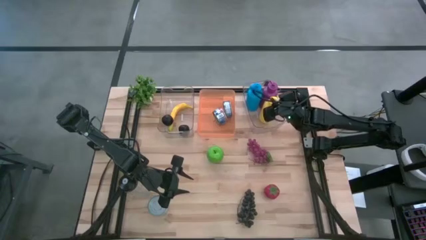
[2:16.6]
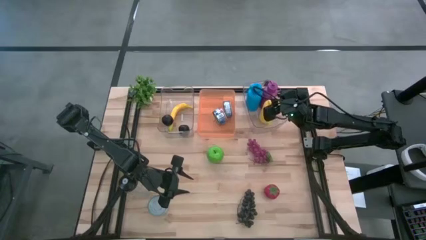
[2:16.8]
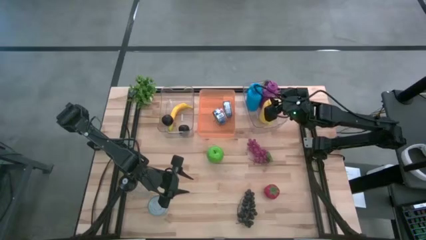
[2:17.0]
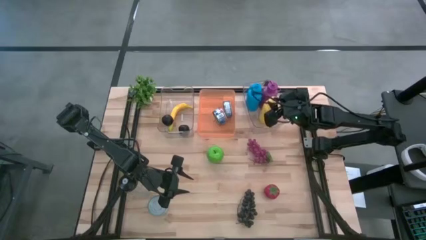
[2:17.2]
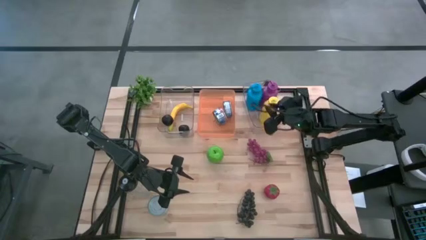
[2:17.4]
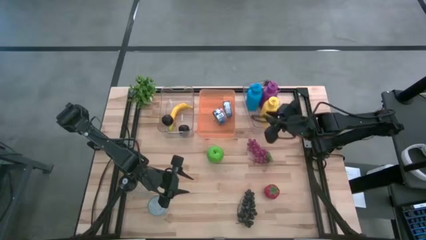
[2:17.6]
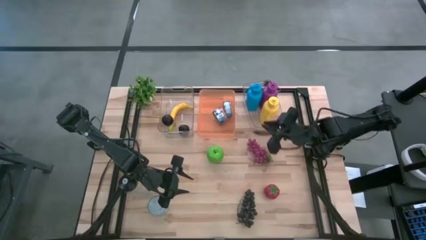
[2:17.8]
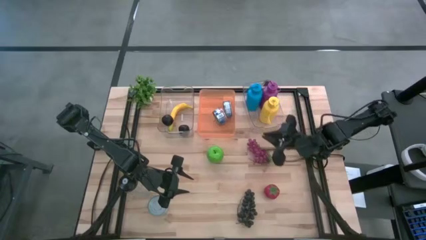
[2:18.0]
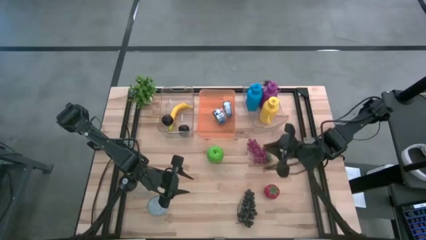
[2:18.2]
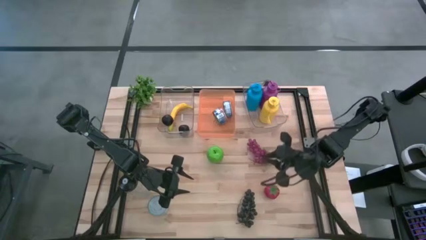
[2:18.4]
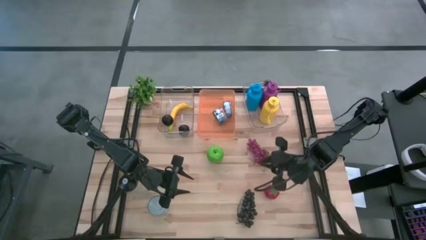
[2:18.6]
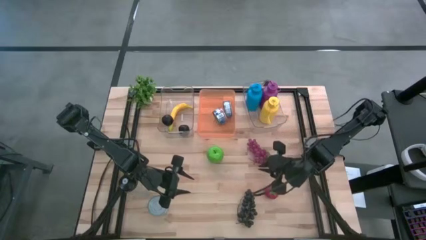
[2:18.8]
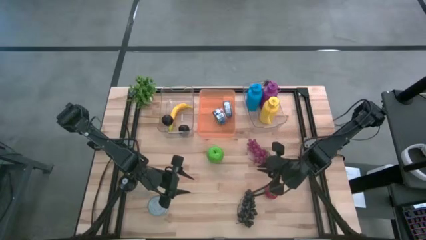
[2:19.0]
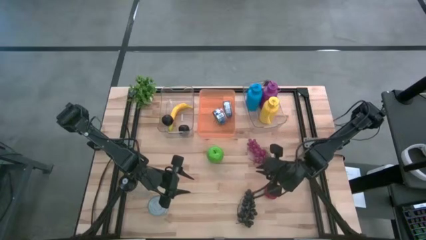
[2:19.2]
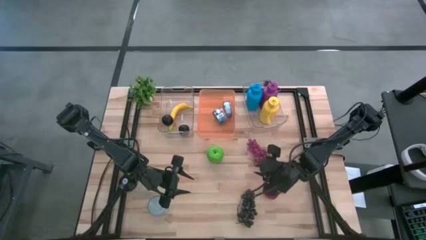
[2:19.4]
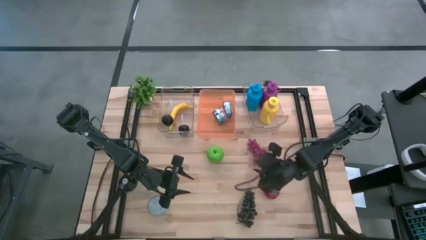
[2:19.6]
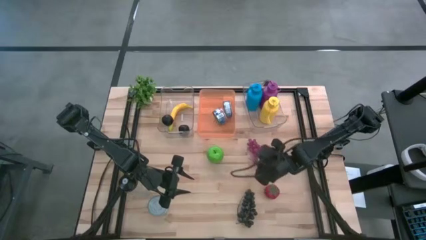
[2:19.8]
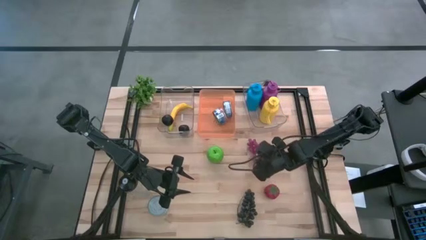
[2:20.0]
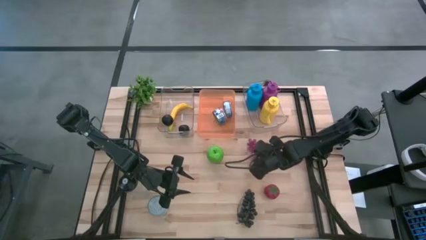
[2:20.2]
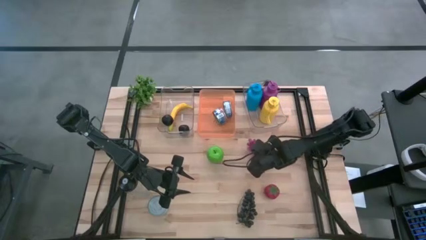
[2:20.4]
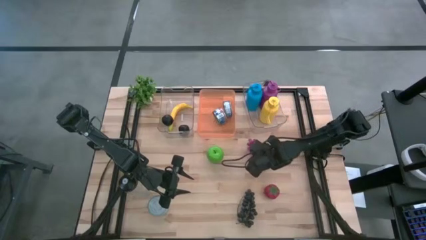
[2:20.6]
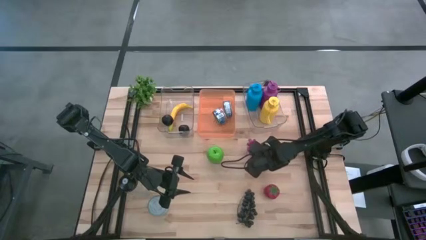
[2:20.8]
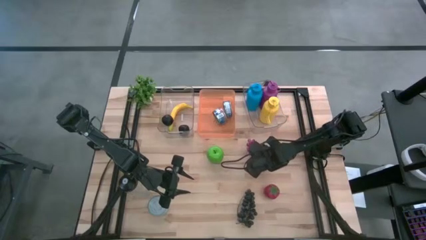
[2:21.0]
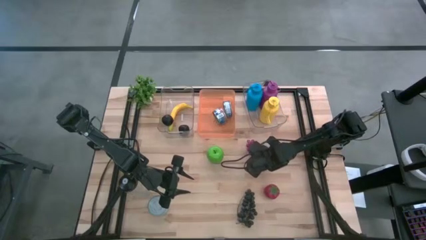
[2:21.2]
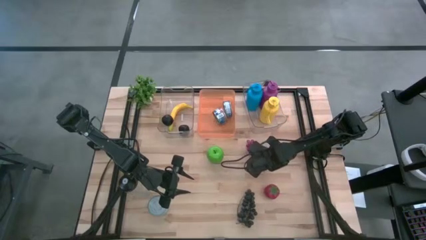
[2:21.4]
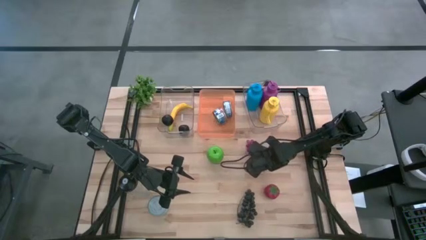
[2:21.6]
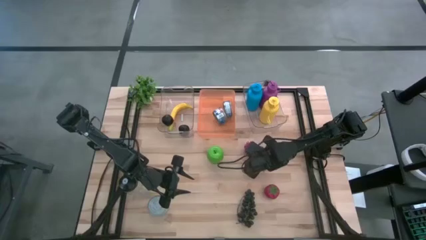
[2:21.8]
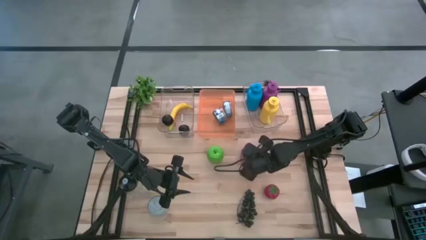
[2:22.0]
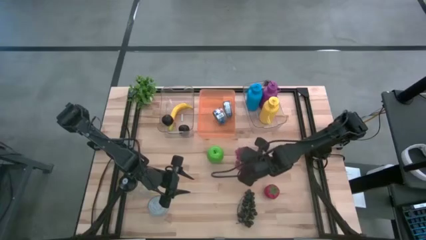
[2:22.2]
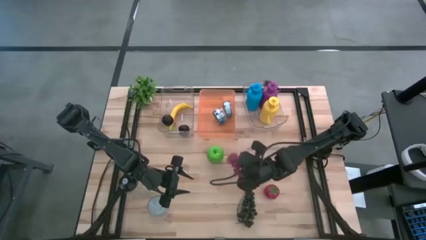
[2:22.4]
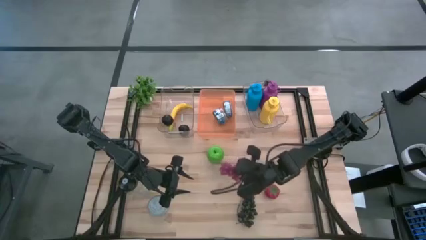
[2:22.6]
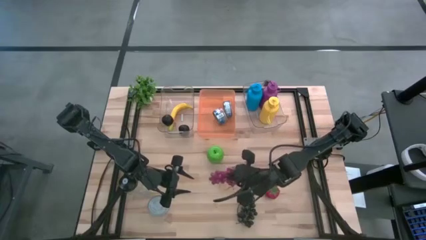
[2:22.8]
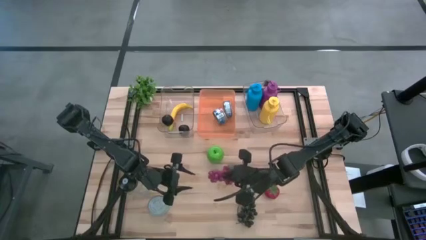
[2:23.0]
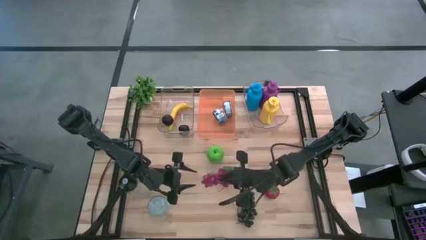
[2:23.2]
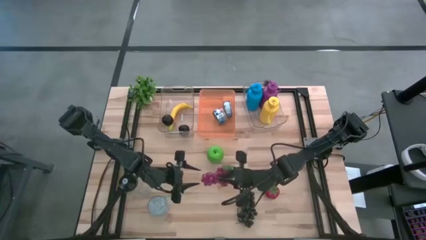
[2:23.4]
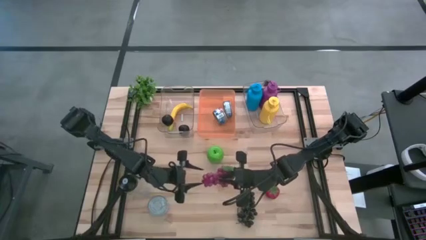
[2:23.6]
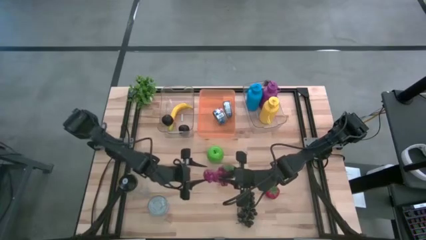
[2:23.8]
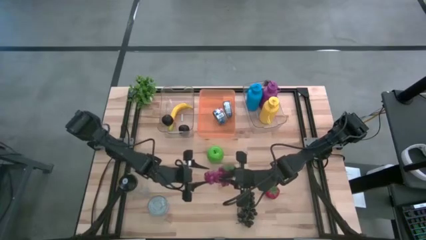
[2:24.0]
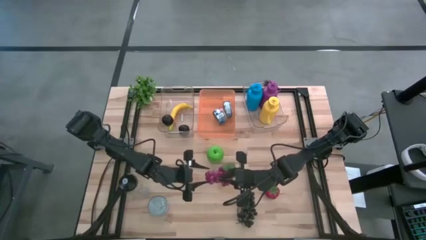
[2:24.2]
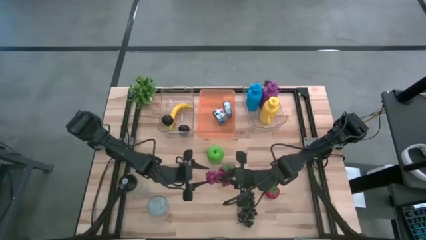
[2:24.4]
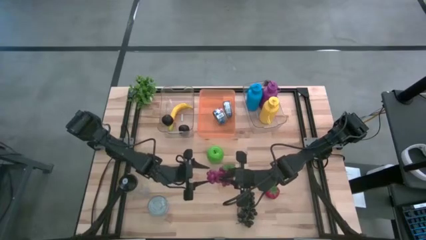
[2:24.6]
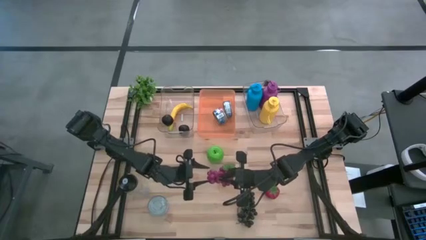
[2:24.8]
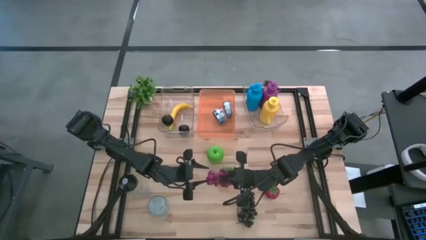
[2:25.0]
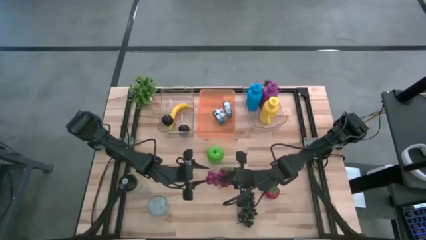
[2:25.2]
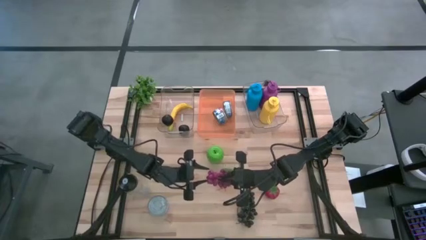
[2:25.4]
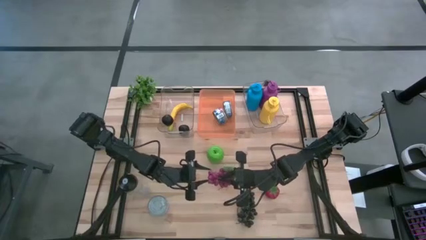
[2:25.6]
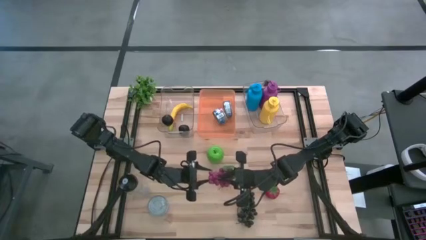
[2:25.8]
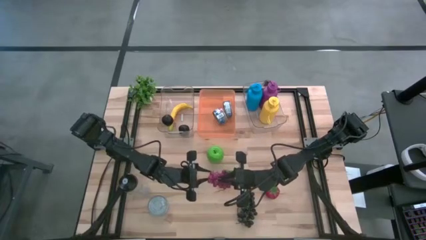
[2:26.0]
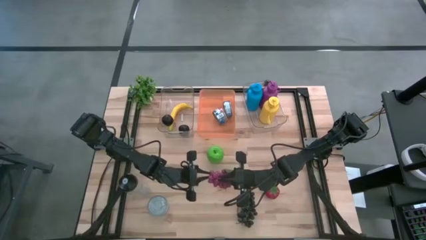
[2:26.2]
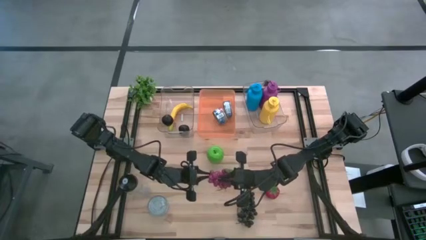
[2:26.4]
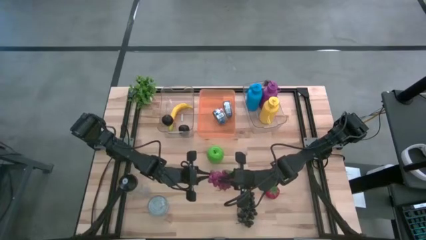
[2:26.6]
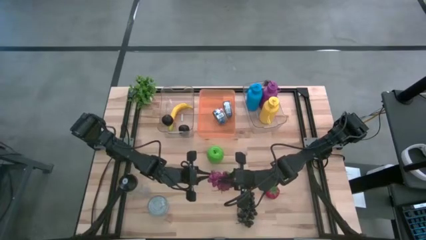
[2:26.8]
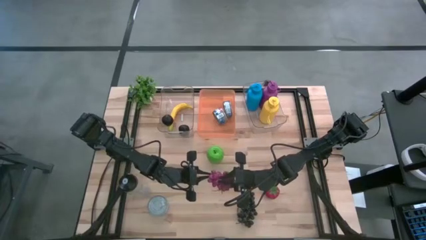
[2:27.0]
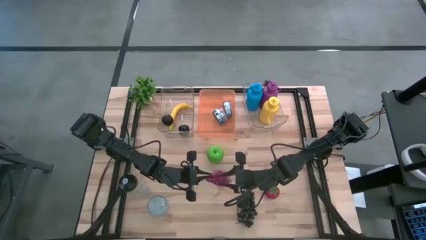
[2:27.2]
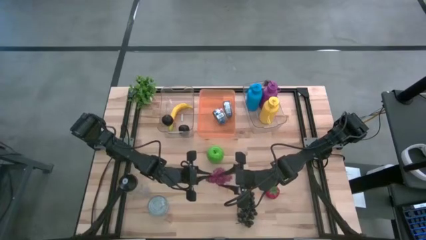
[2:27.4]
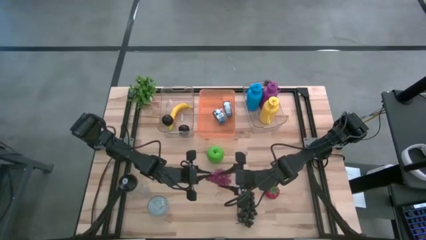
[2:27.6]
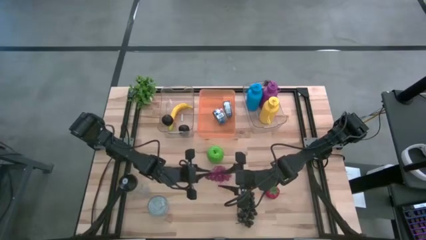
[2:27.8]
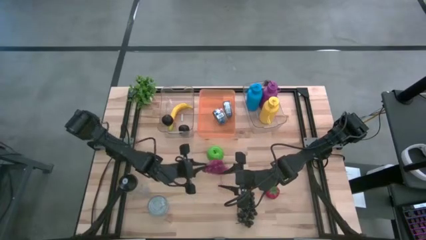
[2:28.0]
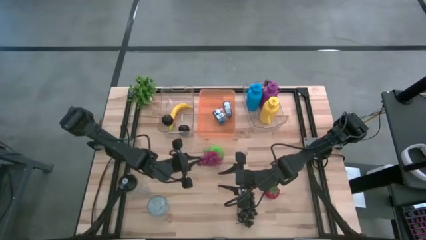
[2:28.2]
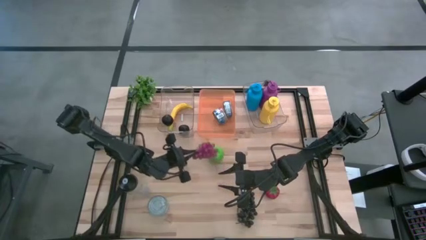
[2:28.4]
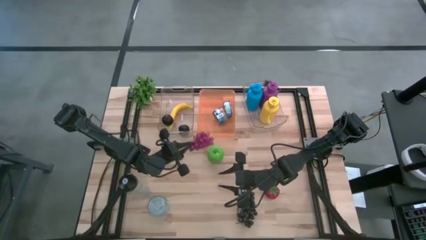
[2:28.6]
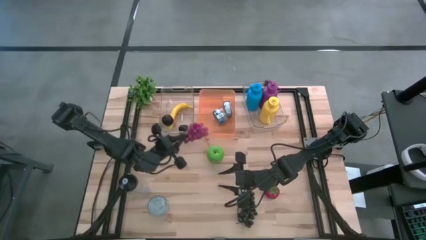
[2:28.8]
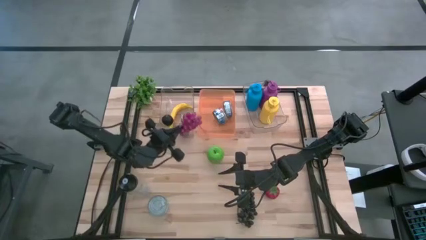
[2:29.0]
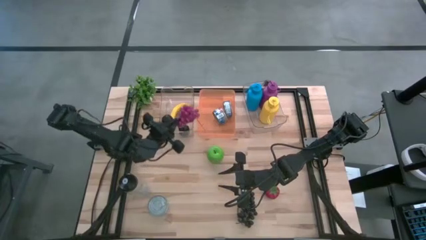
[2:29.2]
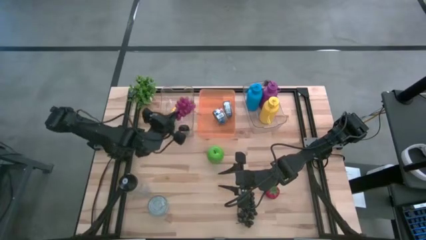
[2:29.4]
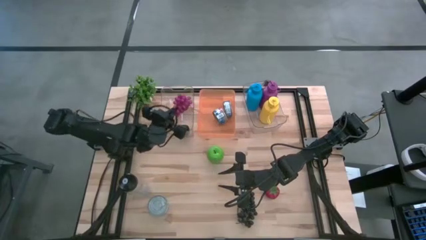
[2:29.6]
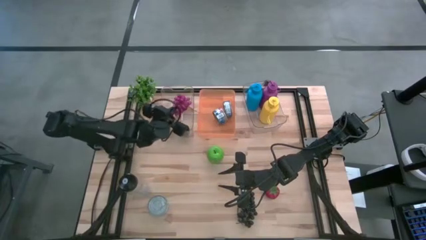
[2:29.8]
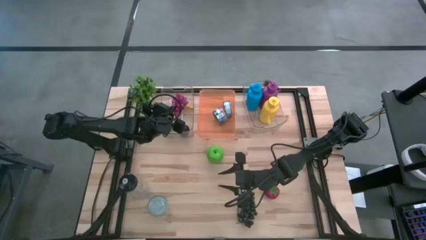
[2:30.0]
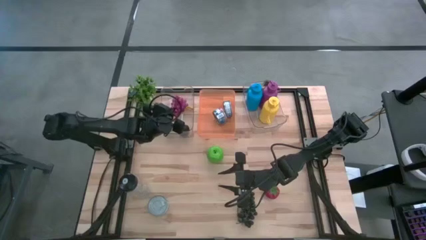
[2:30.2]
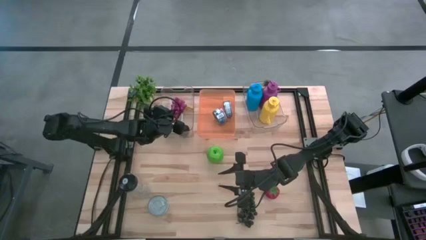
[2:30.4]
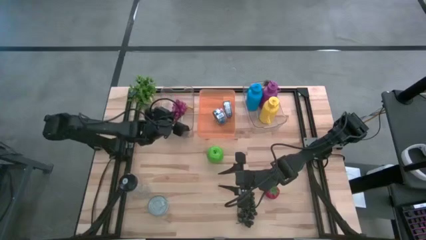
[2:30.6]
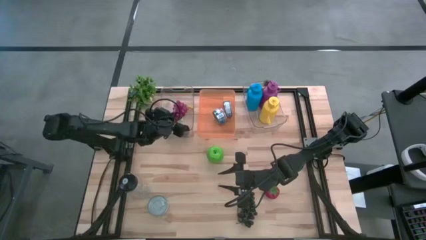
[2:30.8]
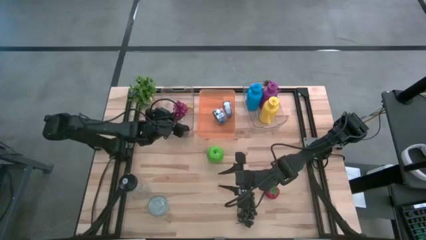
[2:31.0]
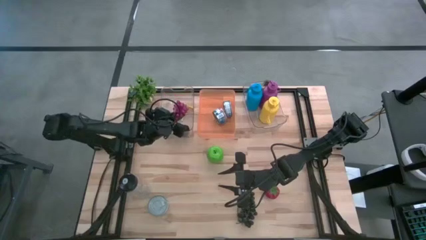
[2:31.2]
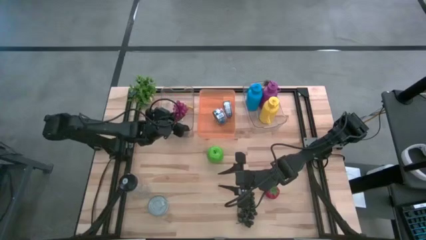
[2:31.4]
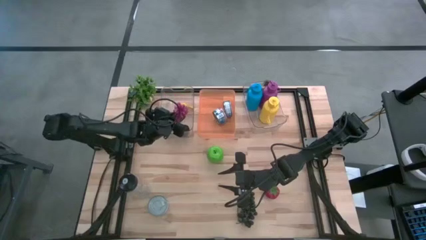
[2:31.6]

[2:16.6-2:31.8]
Task: Pick & Place Food Item
Put the purple grapes into the left transparent bin

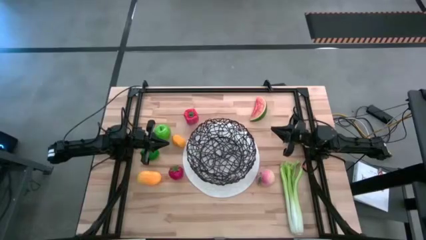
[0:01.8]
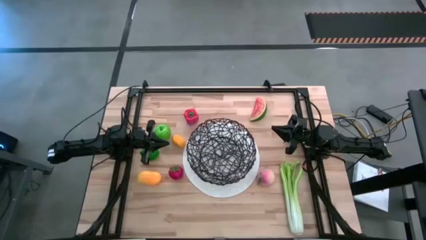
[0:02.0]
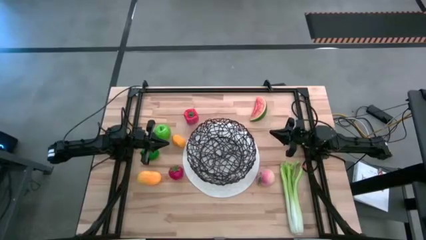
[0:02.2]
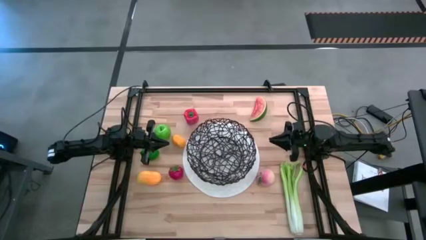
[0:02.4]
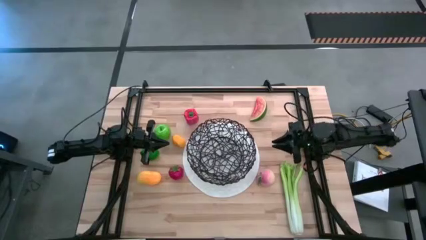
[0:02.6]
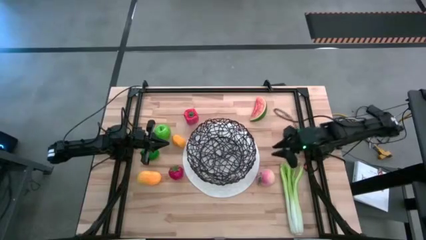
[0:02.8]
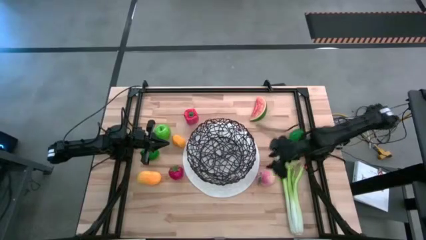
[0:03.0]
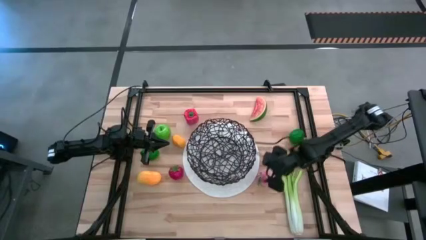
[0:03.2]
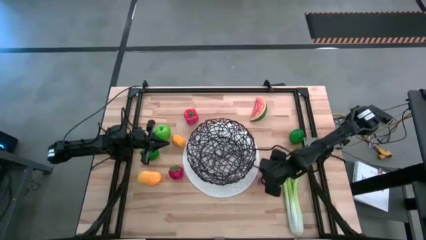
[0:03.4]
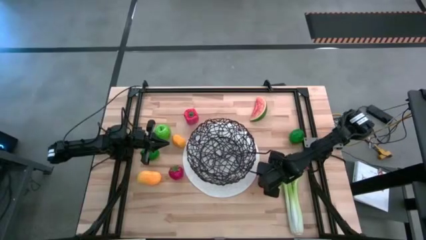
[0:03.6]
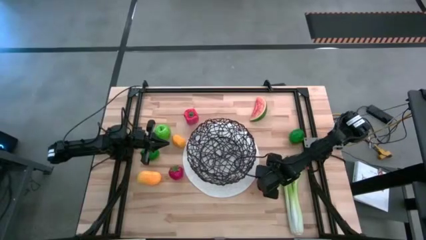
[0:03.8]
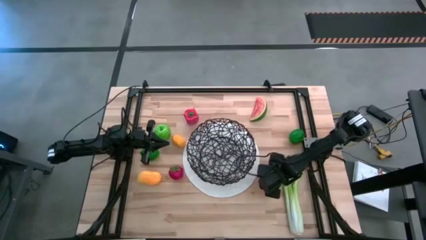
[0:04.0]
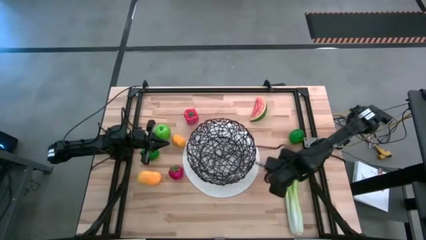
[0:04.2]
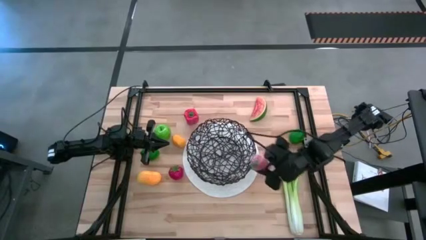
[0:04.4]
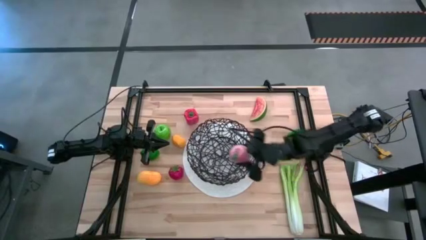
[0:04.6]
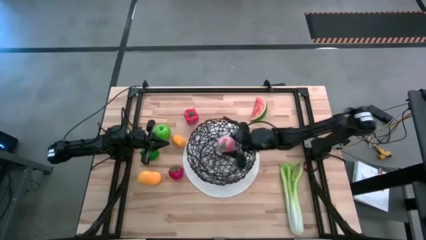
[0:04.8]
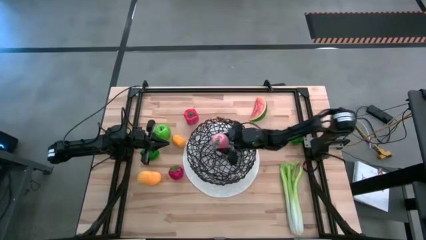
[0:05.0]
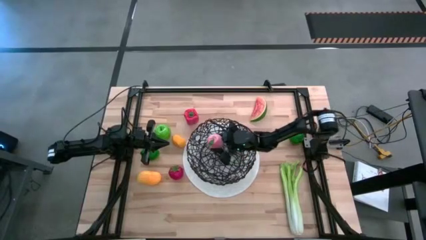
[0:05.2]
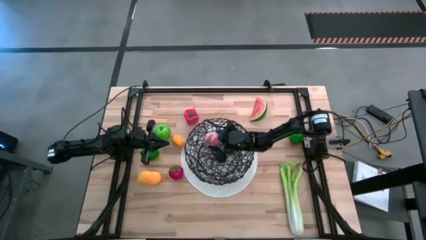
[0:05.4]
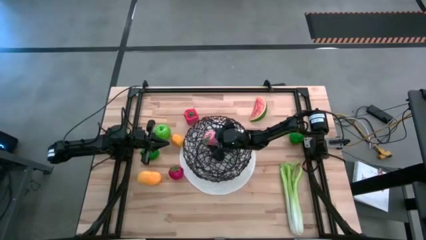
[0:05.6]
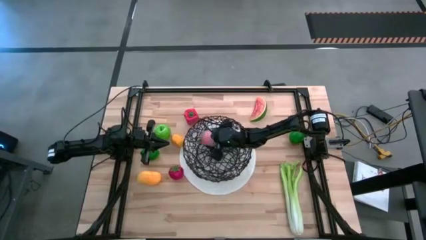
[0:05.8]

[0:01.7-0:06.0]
Task: Build produce basket
Put the pink peach into the wire basket
